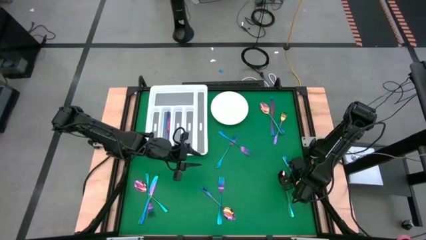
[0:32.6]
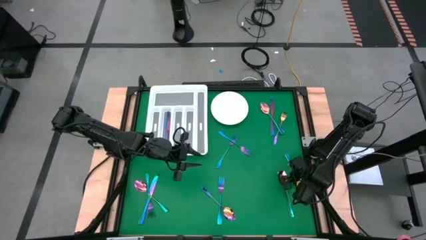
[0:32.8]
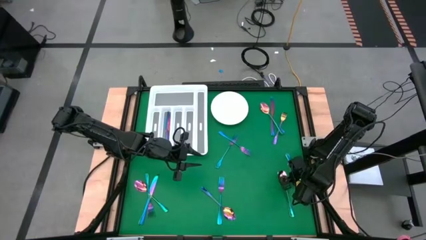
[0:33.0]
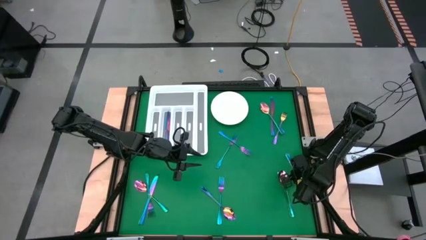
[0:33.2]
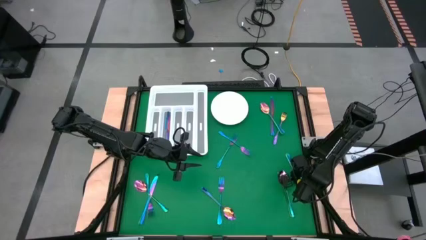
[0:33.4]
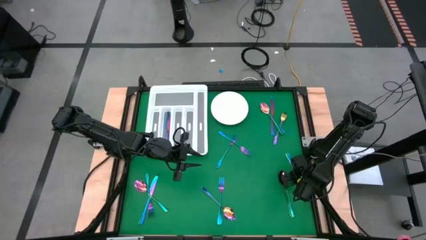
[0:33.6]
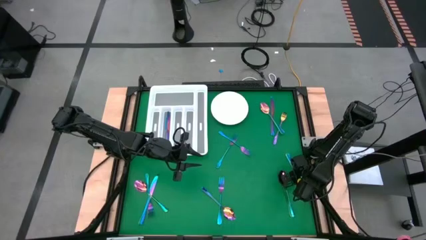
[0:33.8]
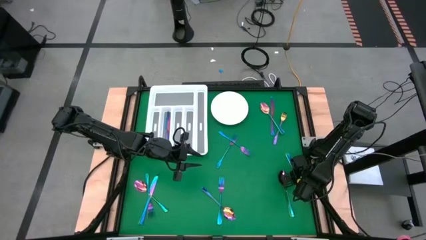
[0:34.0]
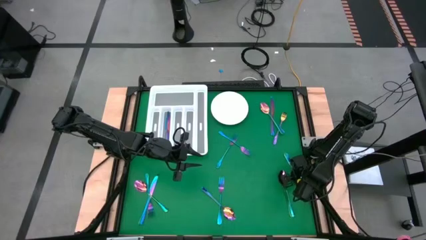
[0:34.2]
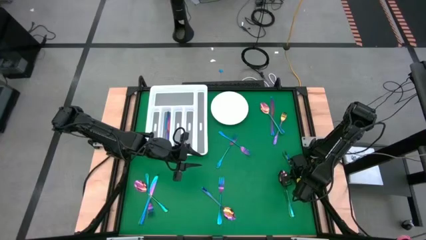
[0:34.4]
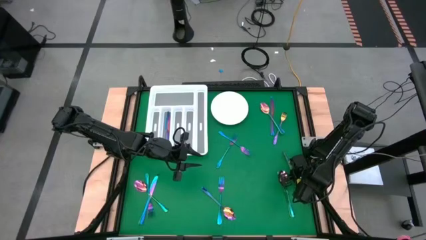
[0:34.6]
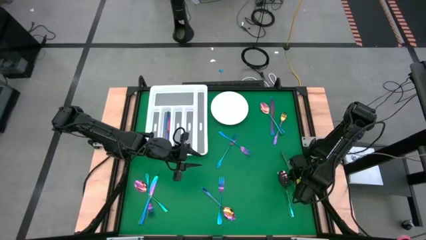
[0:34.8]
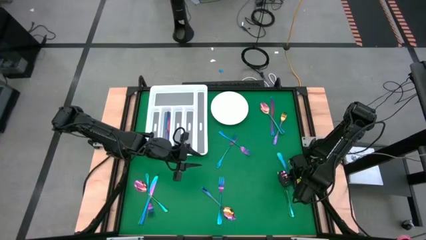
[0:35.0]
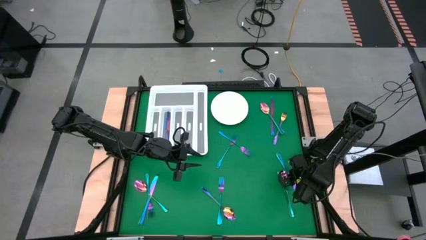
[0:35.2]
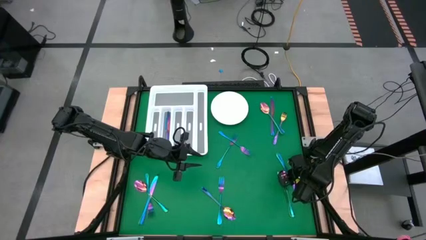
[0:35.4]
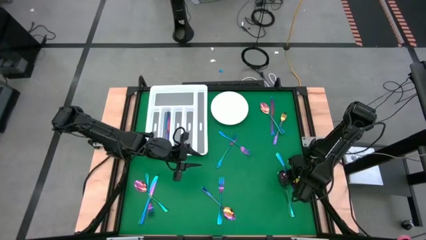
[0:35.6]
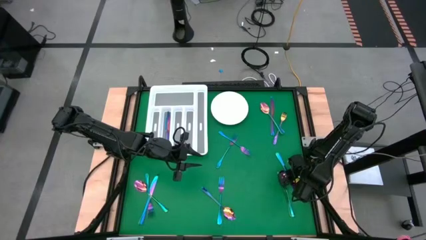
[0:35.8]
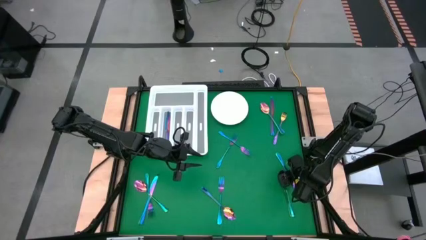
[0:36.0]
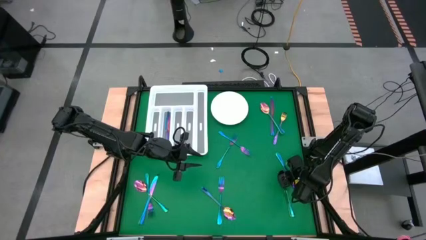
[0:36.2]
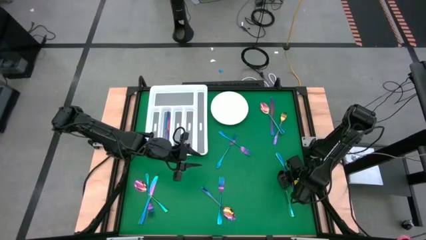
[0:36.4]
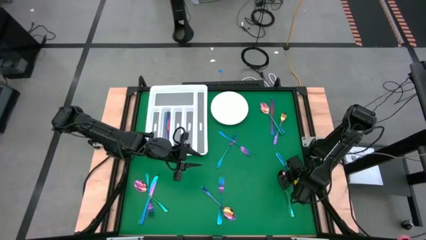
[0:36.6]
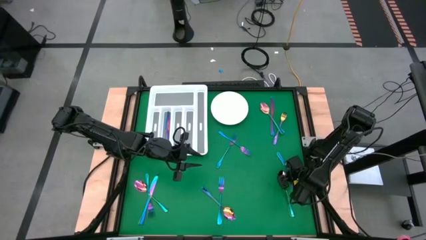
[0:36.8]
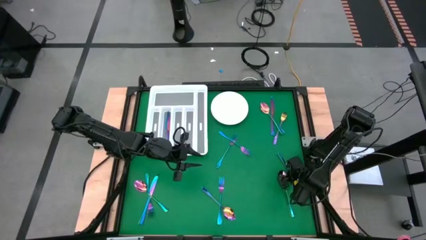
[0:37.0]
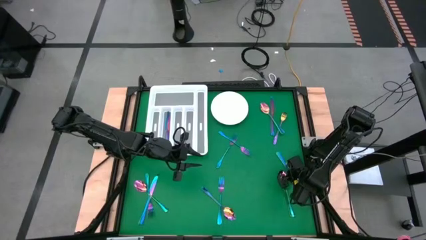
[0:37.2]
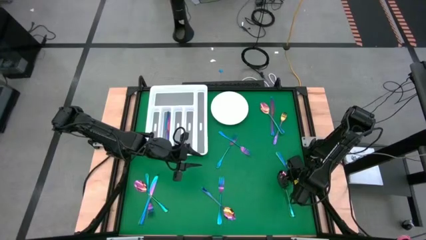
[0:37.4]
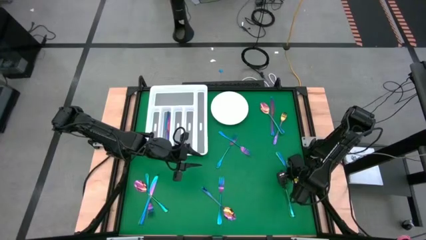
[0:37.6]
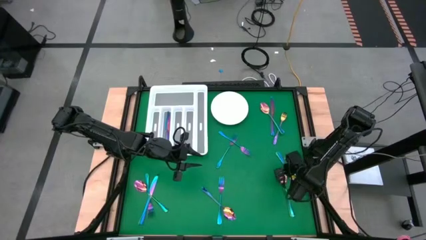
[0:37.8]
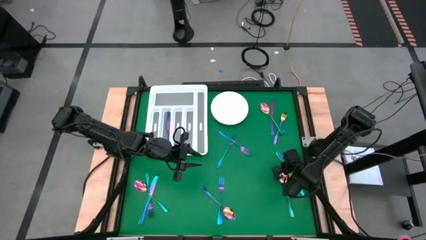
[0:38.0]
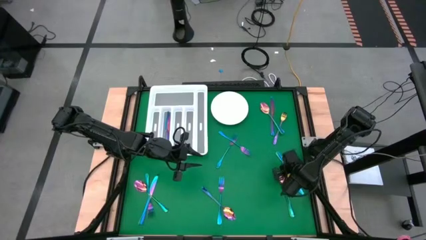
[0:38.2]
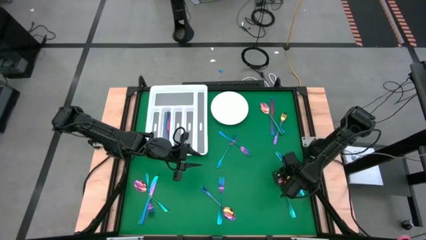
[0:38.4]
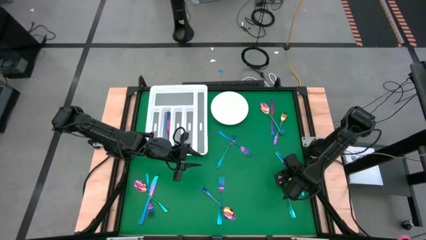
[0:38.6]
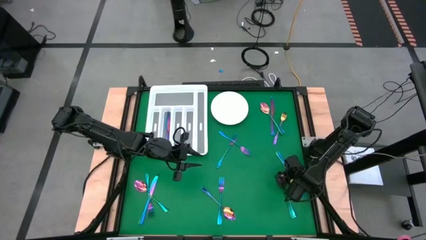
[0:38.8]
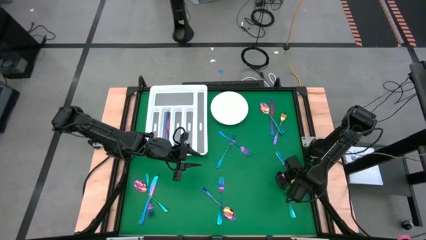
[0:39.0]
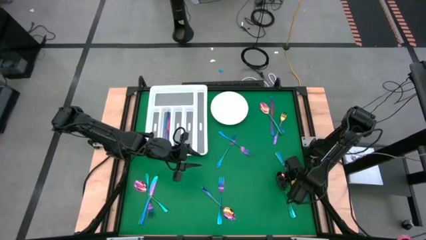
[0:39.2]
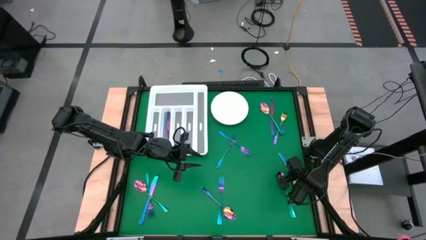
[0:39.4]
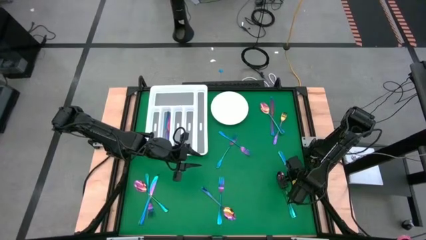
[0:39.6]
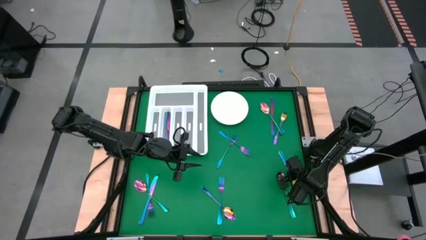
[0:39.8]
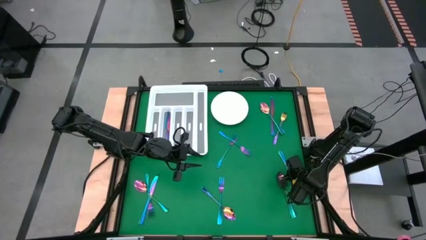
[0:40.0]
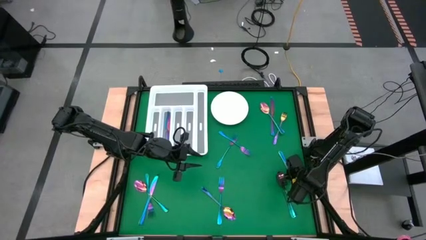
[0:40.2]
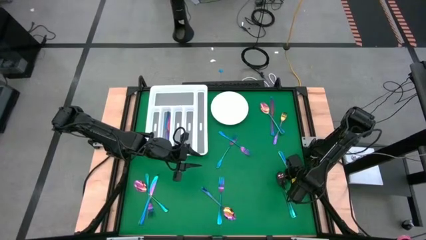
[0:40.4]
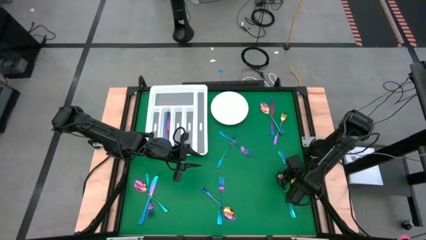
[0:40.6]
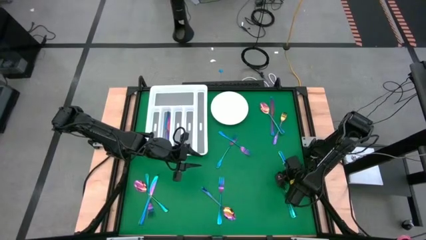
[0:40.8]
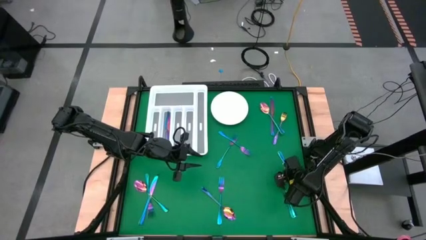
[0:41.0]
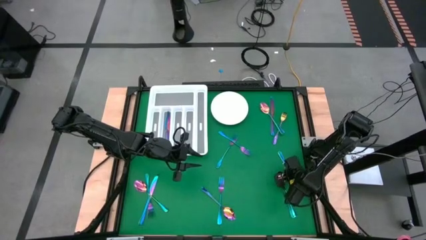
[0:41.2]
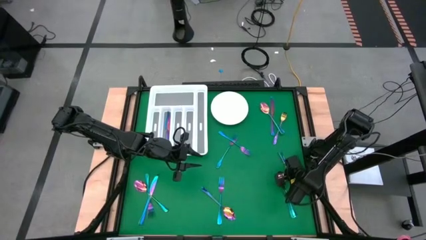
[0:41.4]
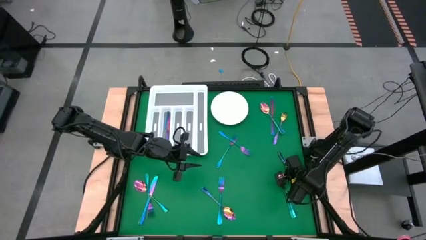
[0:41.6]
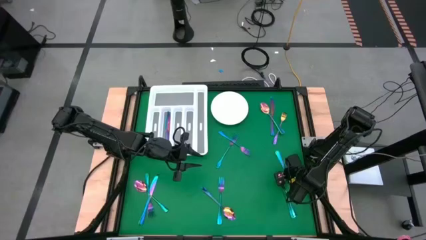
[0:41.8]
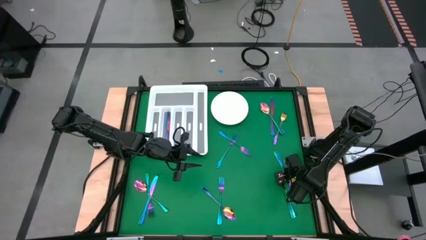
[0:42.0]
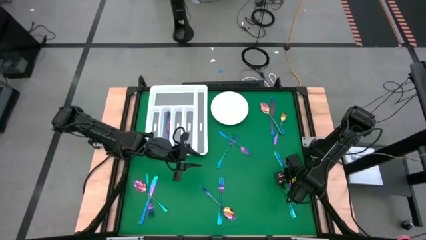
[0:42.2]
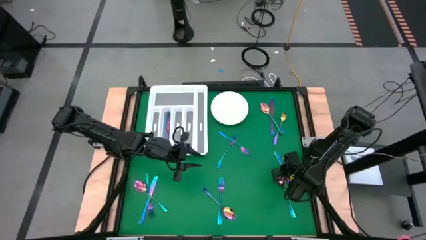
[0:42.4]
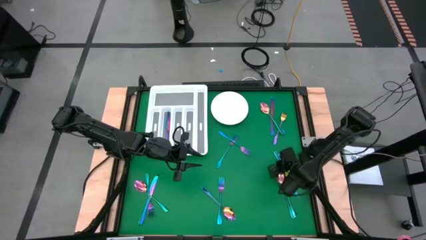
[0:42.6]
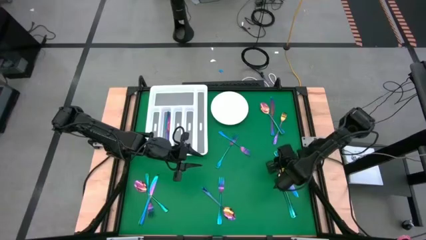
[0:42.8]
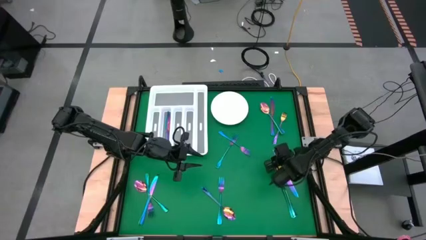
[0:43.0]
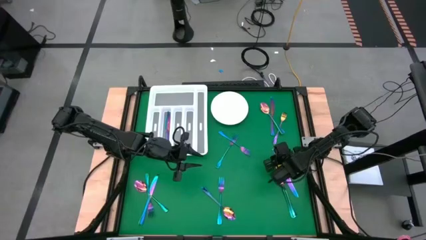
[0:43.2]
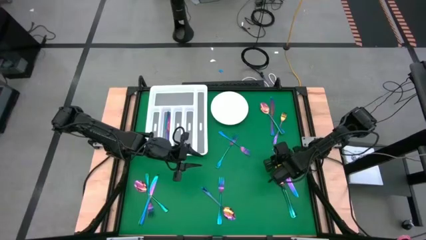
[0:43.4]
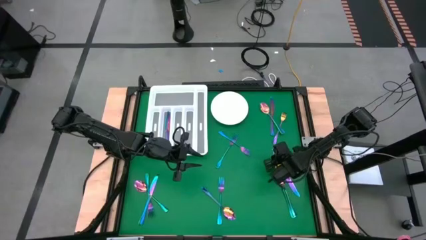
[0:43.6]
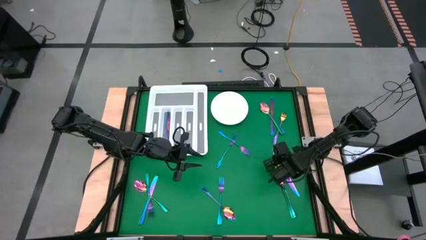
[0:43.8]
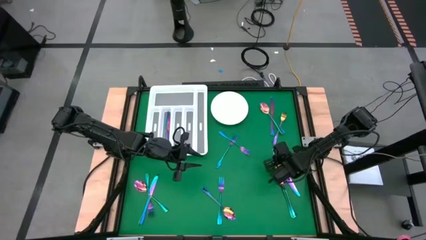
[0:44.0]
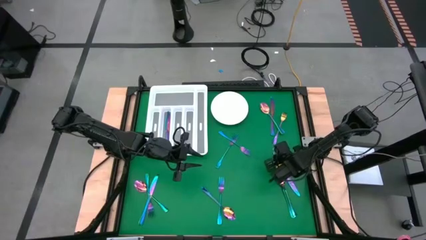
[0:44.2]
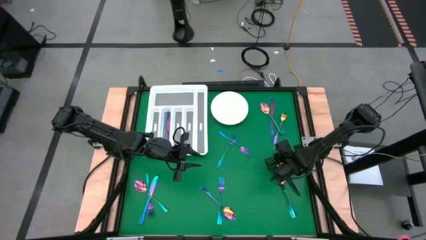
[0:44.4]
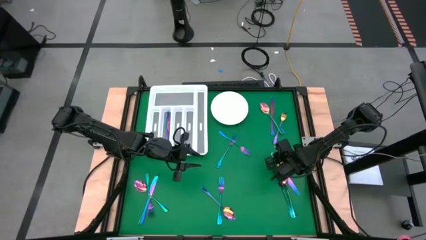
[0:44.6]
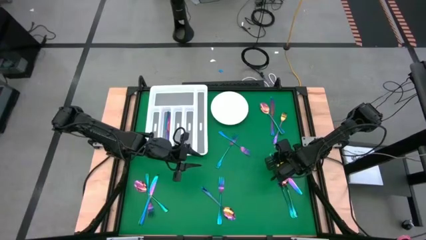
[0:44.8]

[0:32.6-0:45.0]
Task: Sort silverware
Put the blue knife into the silverware tray
